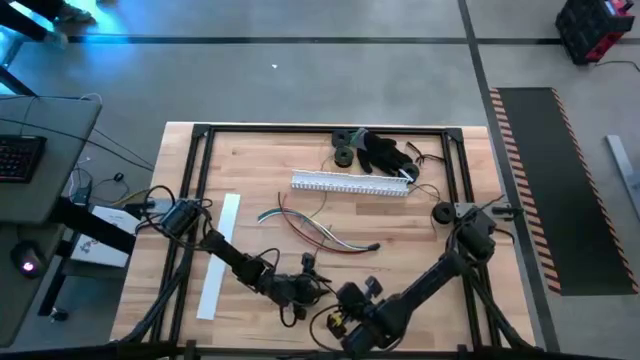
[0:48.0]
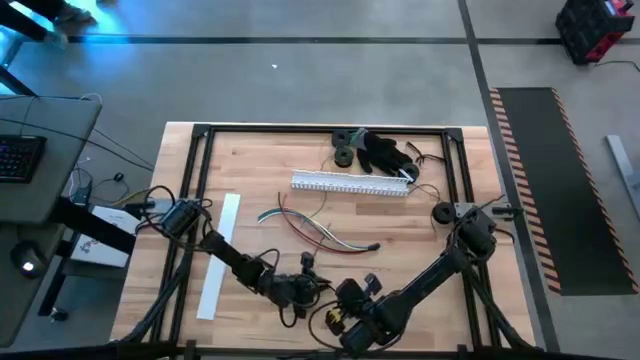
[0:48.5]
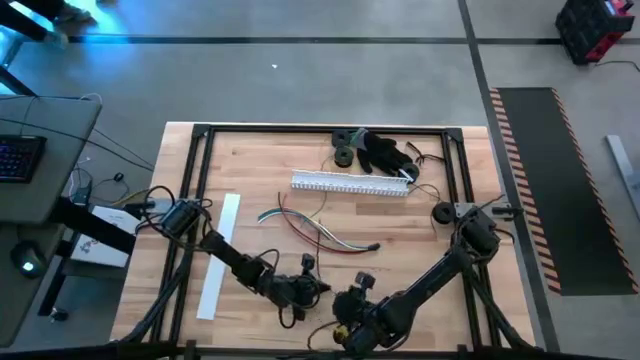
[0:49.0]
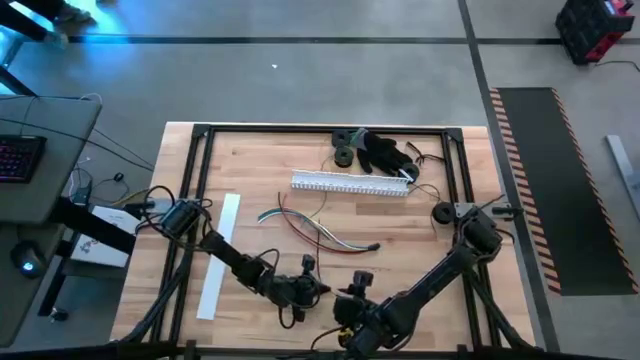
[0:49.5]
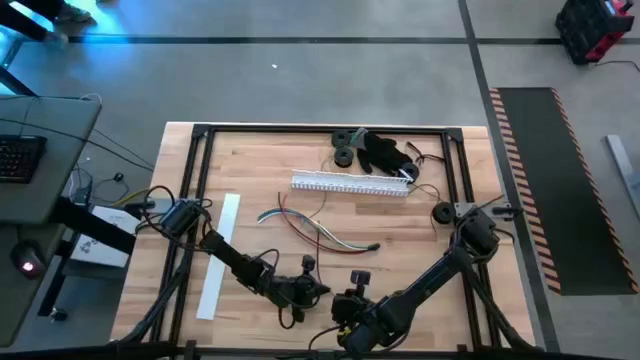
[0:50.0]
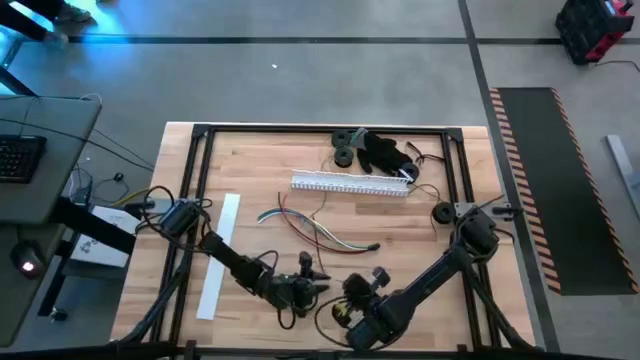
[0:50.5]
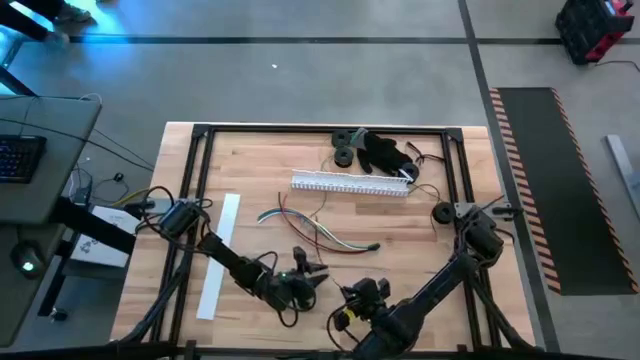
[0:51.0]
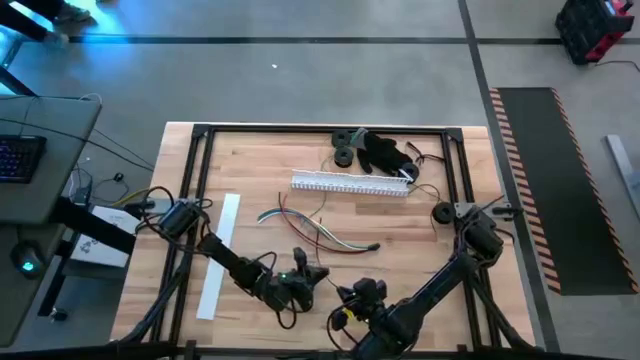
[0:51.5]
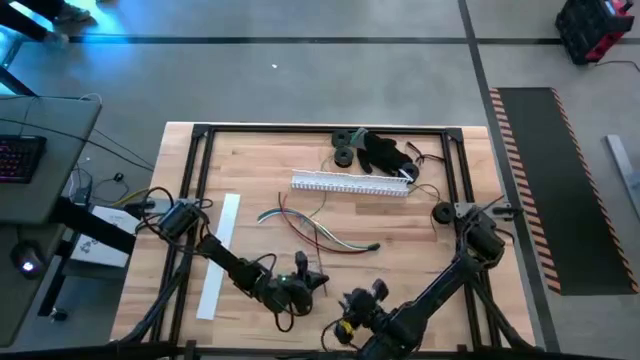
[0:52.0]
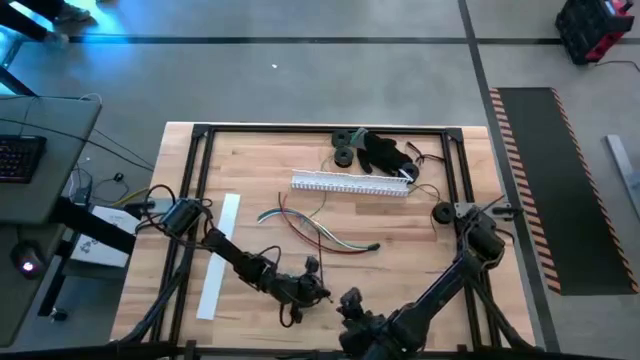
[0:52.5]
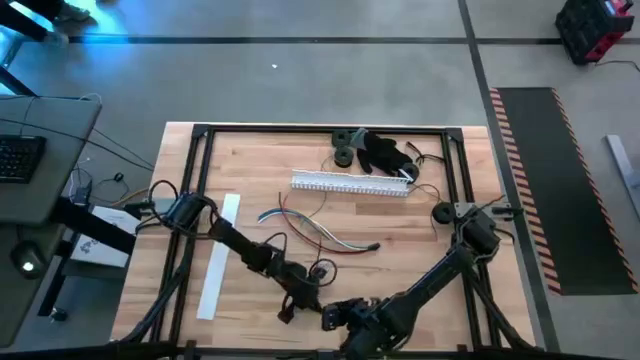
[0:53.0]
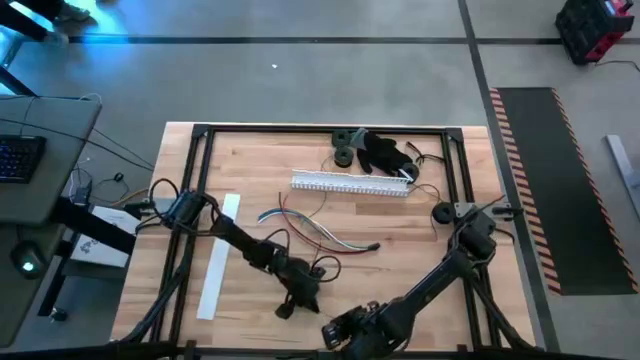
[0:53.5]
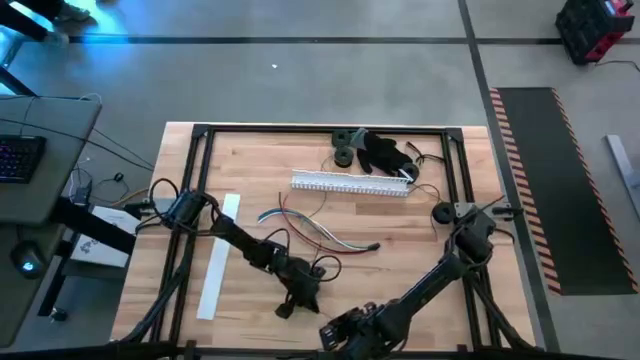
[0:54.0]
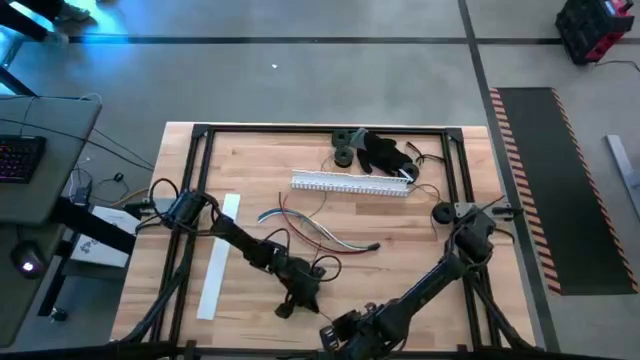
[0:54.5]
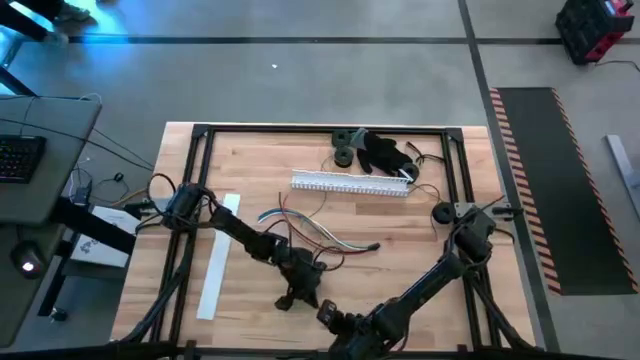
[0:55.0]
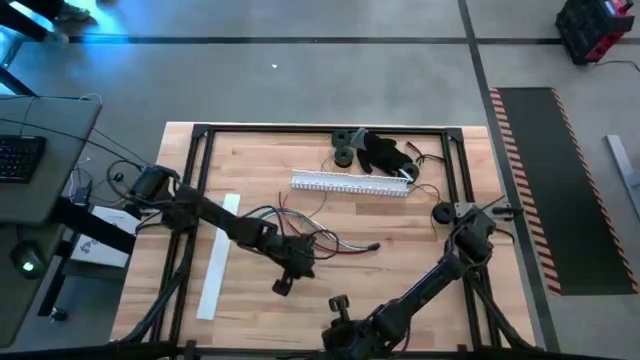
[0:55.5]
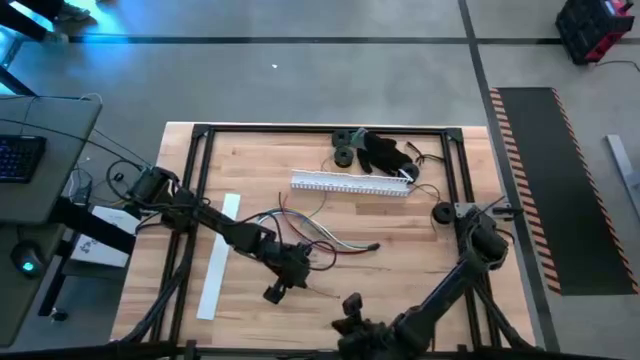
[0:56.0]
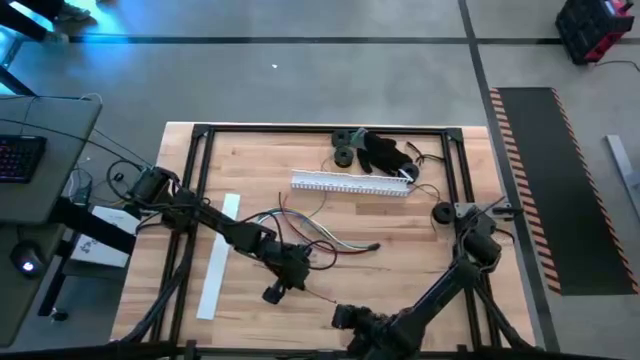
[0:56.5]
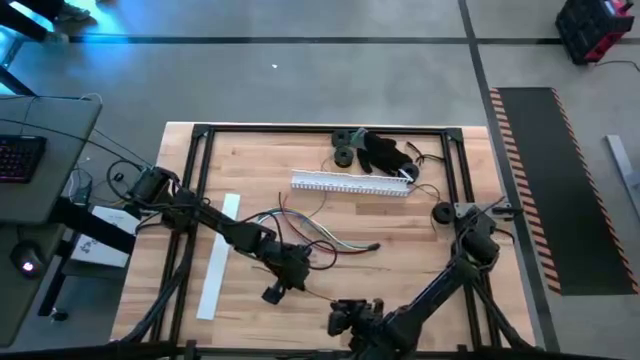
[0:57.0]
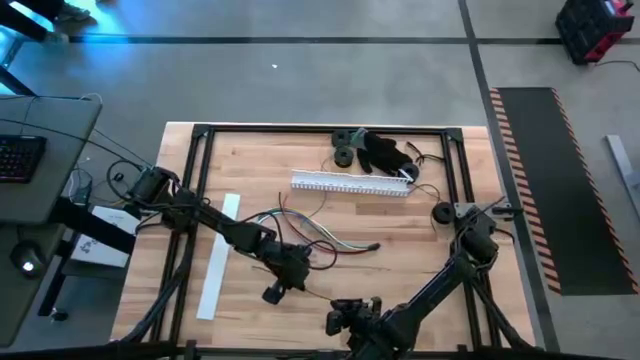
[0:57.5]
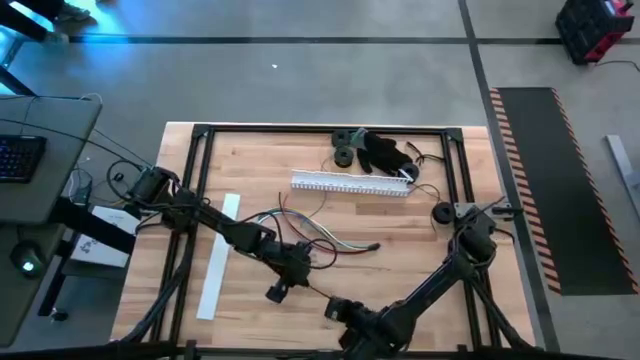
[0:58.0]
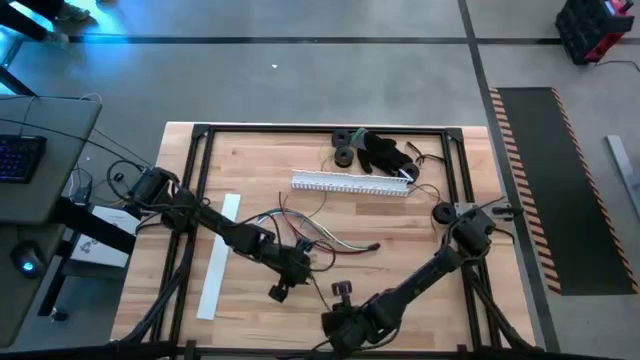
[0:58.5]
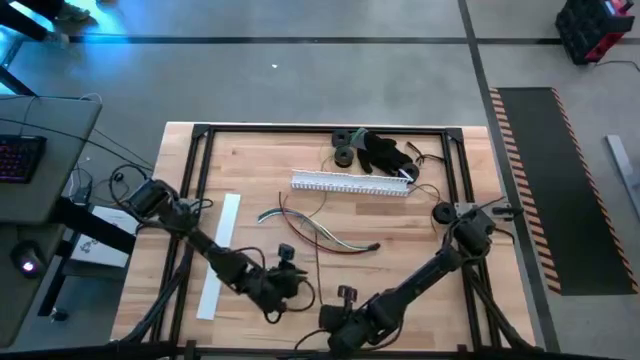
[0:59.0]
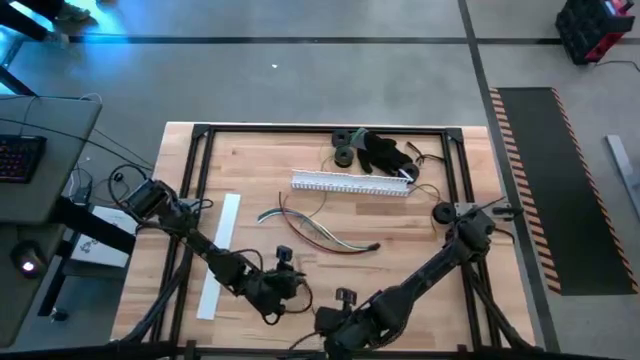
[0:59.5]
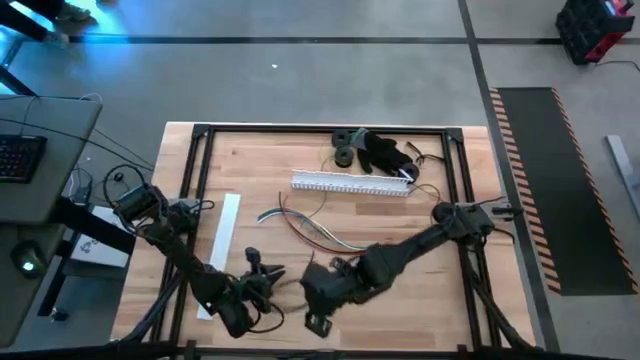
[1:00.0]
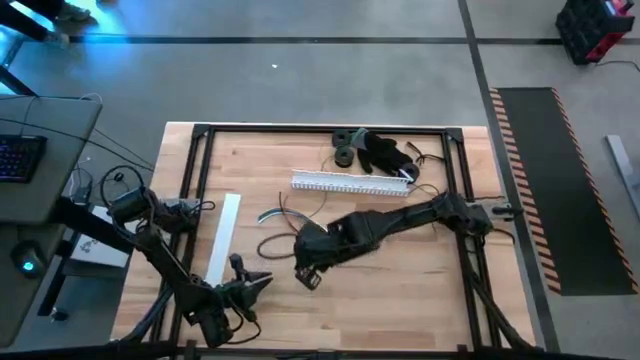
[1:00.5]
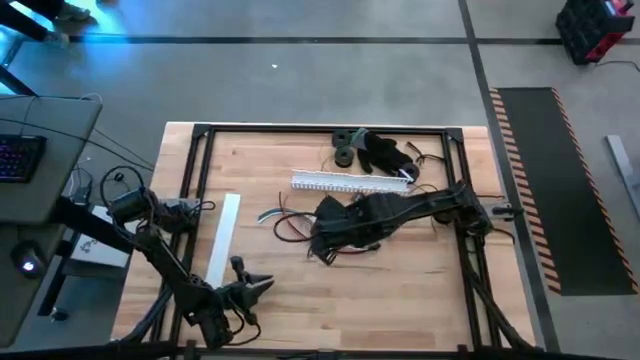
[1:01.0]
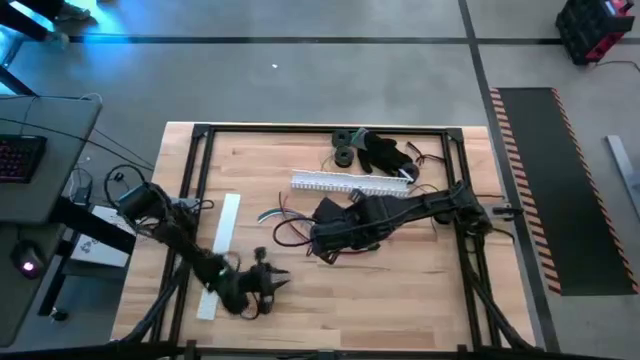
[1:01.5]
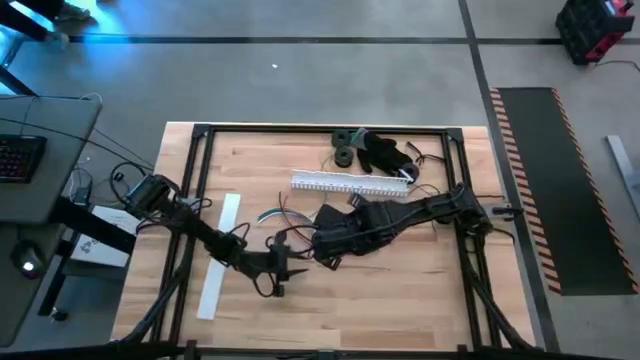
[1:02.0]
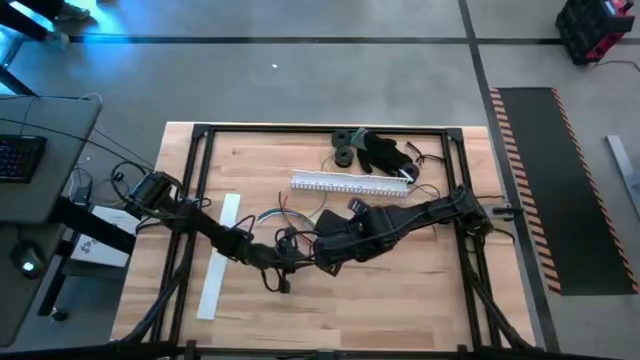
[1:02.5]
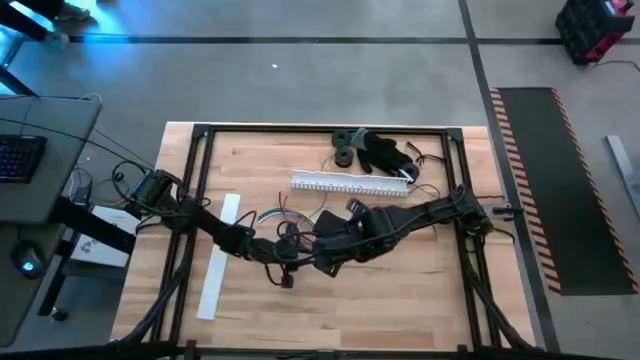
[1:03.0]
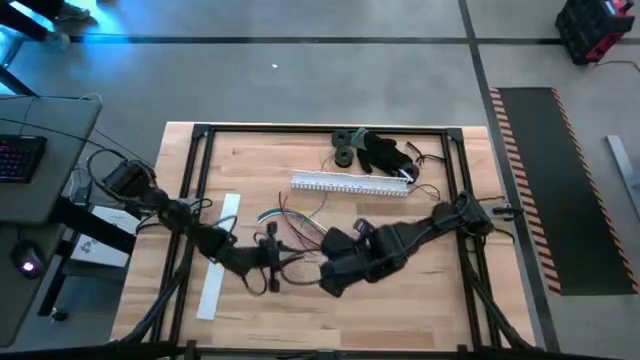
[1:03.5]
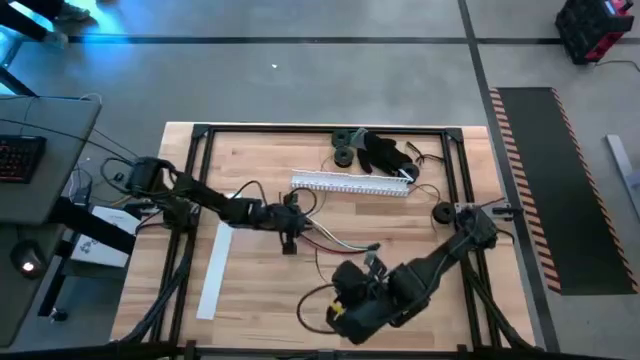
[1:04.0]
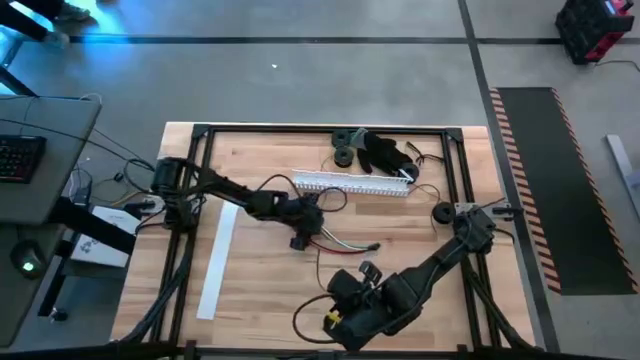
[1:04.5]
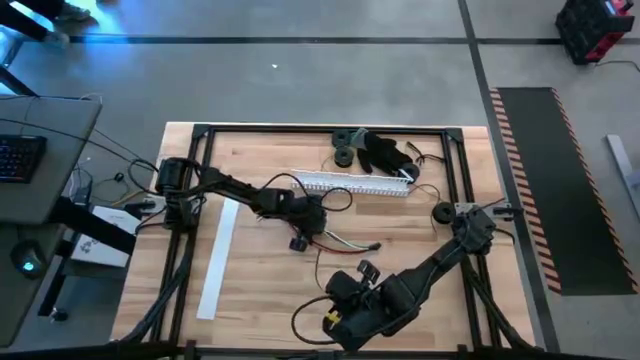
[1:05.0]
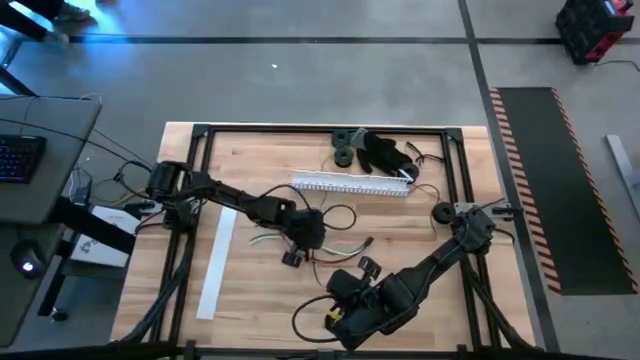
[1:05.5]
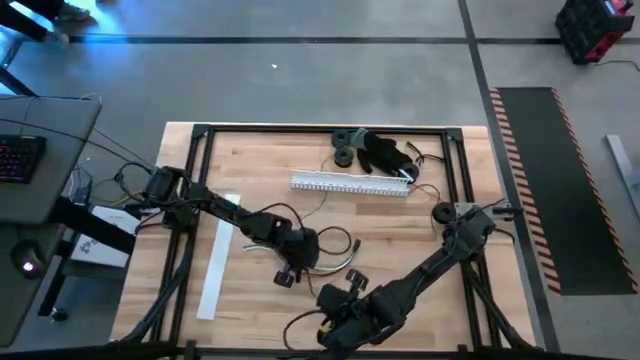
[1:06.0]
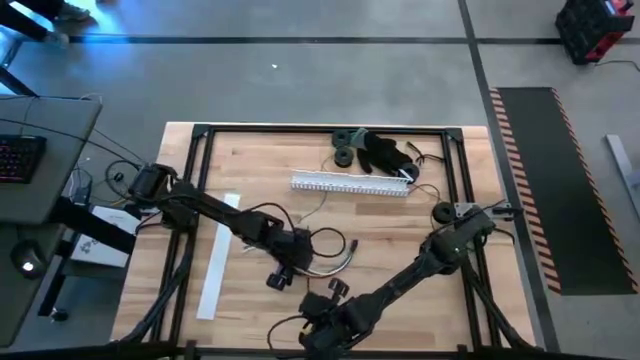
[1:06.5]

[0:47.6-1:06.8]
Task: Ziptie cables
Wrap the cable wire using a black zip tie

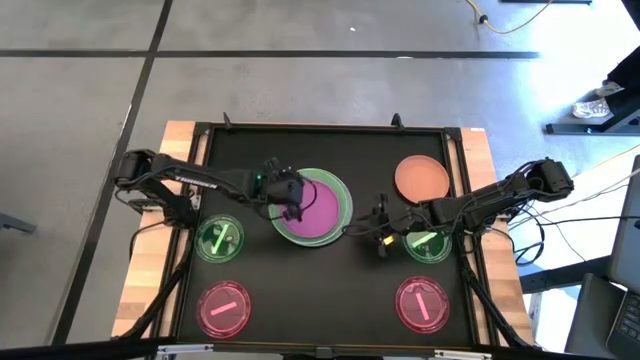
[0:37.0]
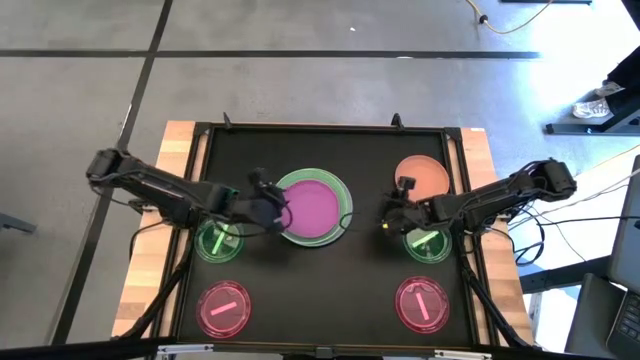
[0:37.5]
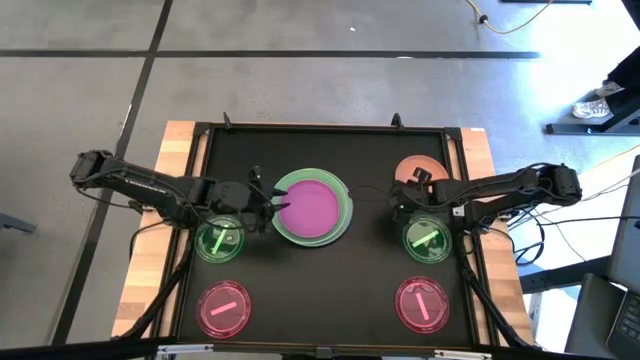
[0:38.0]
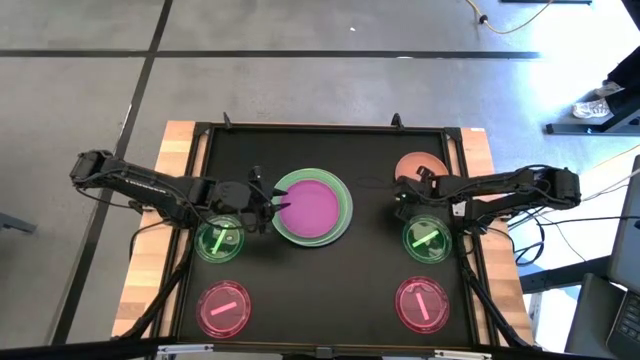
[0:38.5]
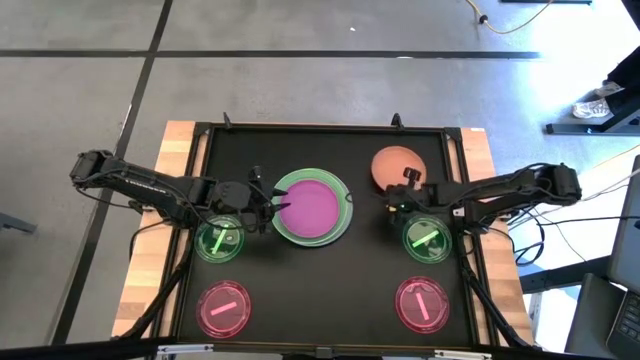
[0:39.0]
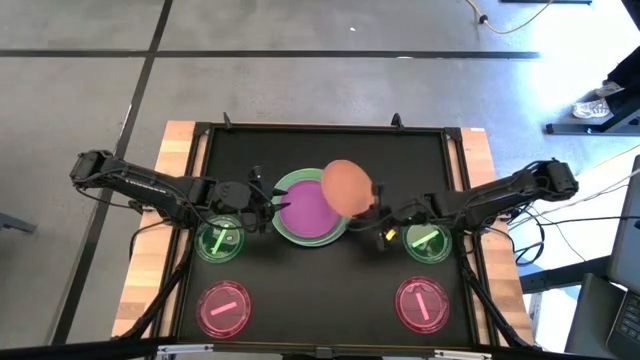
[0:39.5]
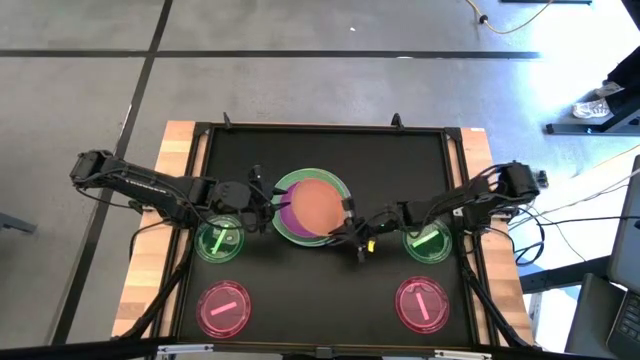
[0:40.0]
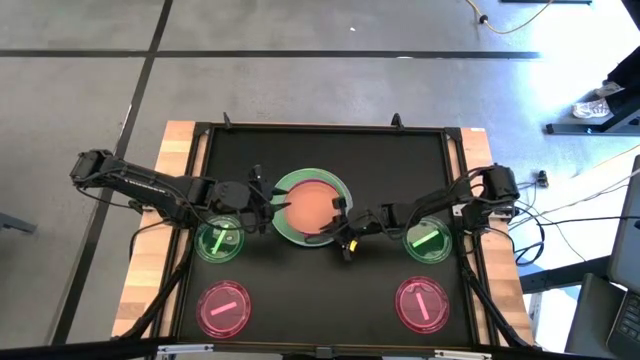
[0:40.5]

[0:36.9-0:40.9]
Task: Stack plastic plates
Stack the orange plate on the pink plate
